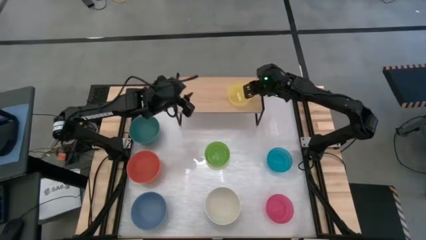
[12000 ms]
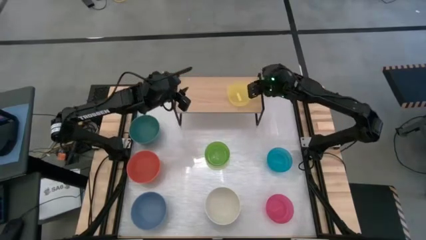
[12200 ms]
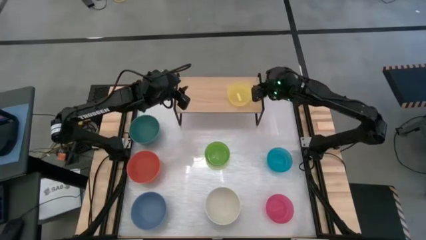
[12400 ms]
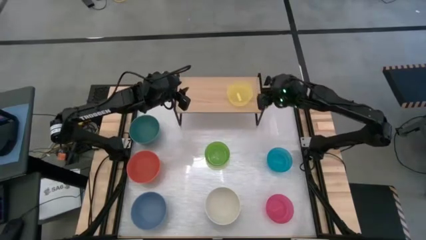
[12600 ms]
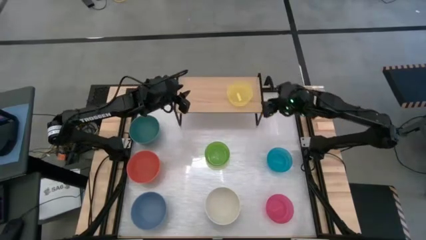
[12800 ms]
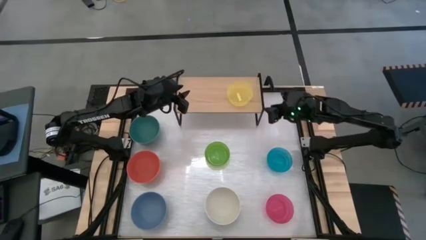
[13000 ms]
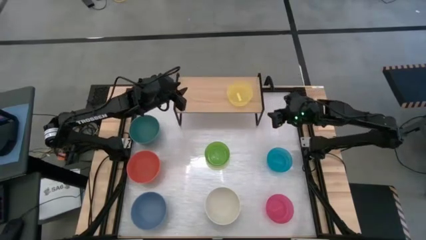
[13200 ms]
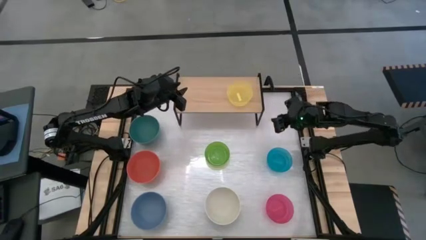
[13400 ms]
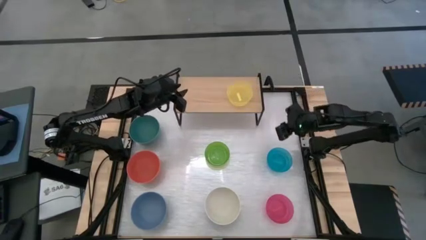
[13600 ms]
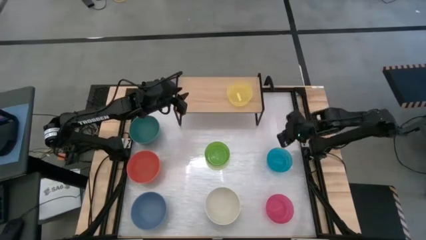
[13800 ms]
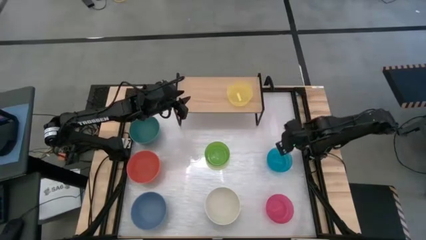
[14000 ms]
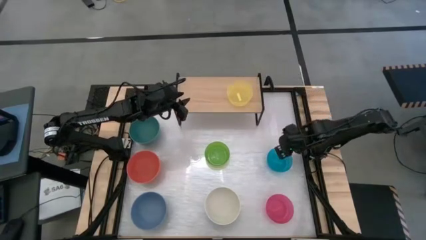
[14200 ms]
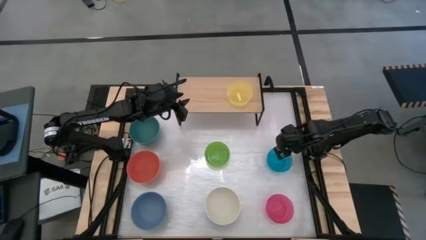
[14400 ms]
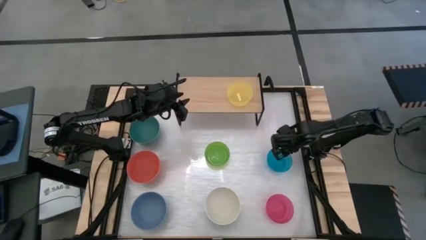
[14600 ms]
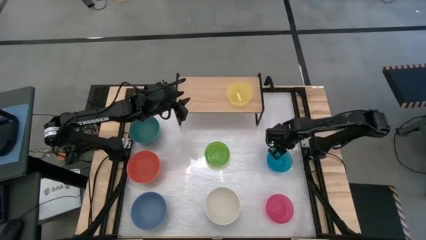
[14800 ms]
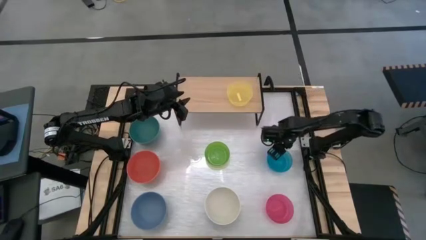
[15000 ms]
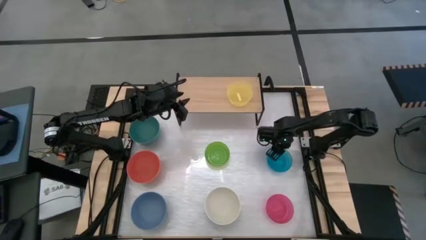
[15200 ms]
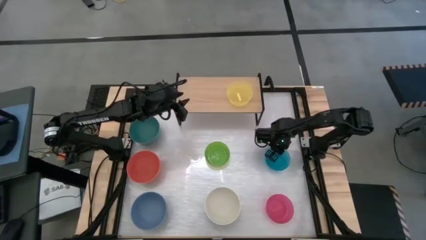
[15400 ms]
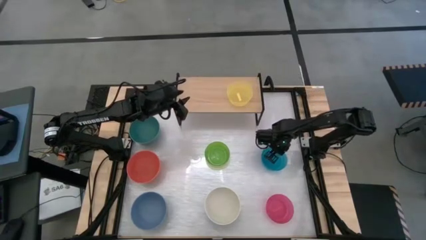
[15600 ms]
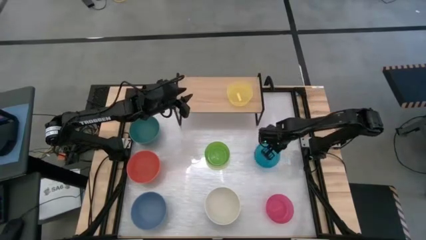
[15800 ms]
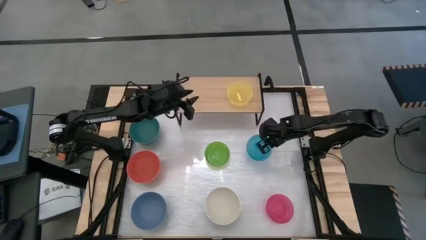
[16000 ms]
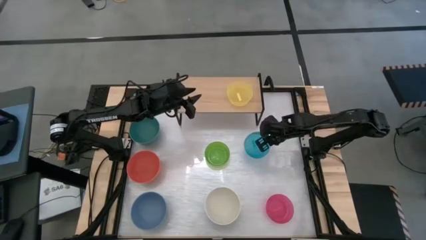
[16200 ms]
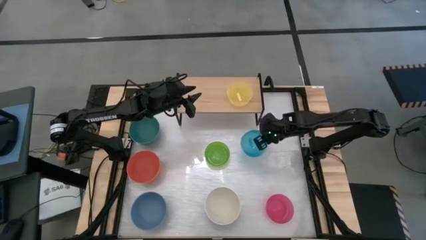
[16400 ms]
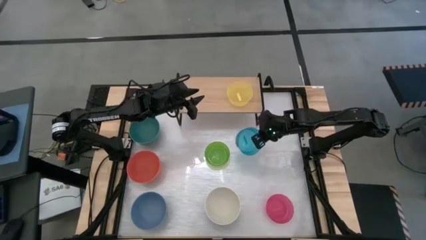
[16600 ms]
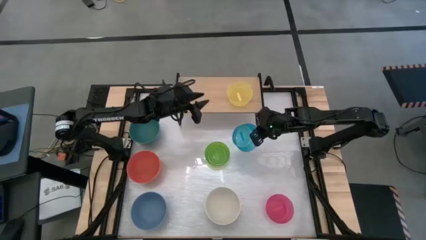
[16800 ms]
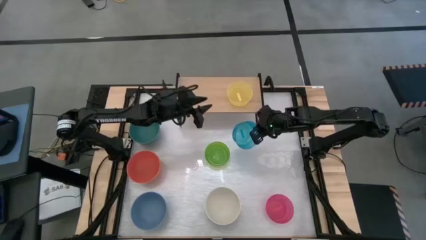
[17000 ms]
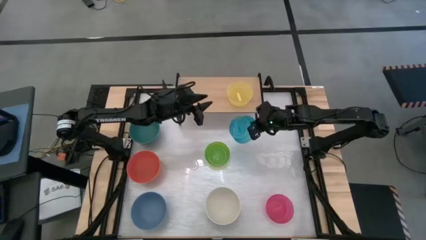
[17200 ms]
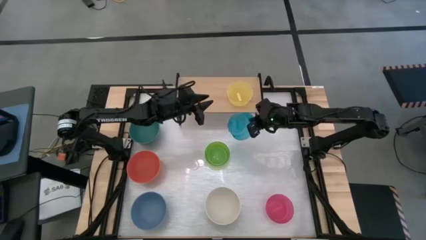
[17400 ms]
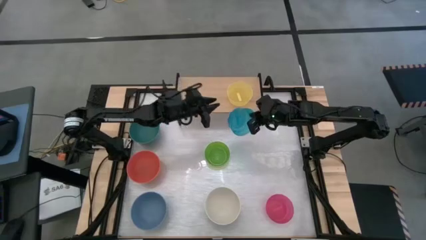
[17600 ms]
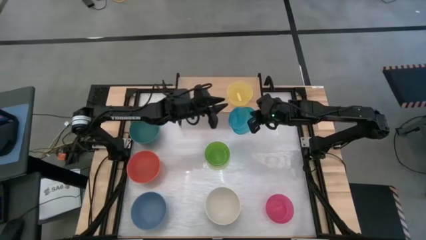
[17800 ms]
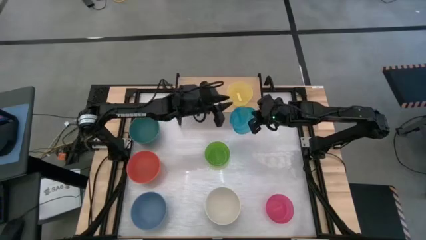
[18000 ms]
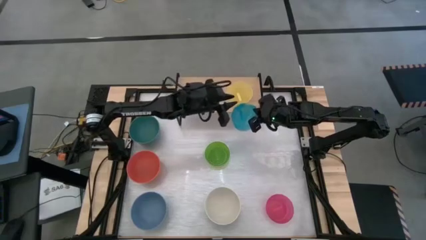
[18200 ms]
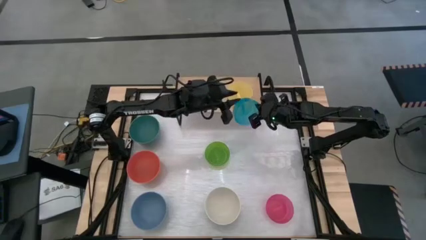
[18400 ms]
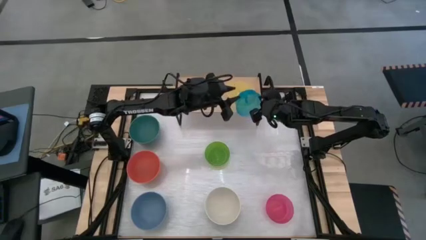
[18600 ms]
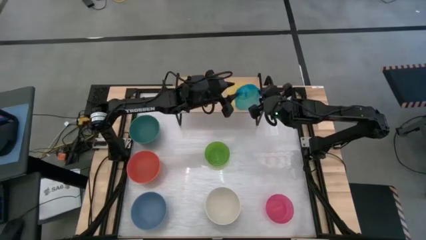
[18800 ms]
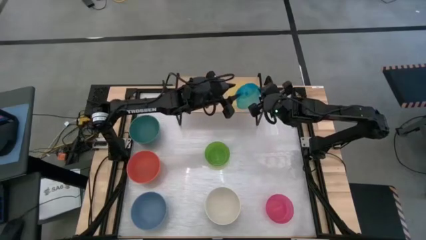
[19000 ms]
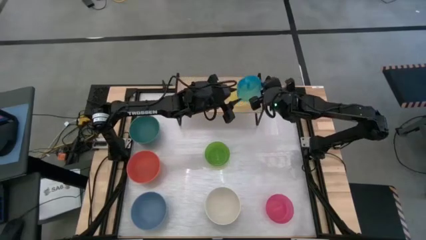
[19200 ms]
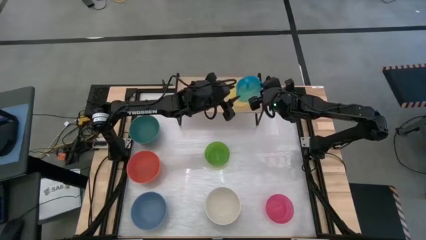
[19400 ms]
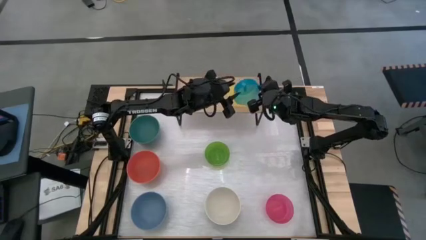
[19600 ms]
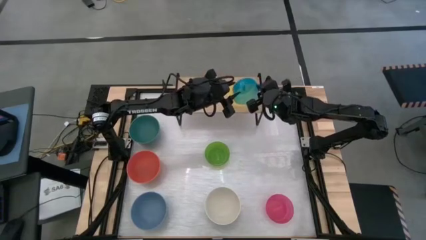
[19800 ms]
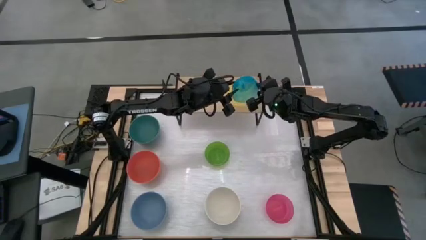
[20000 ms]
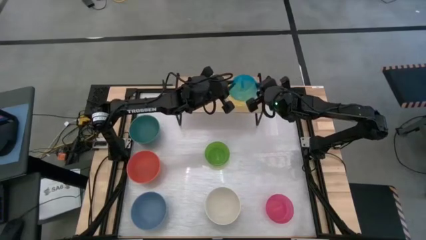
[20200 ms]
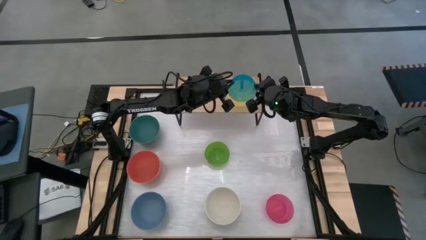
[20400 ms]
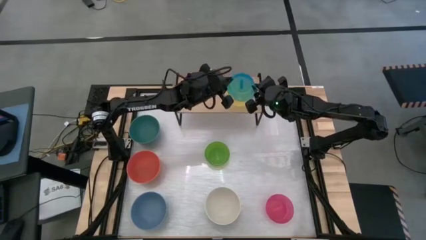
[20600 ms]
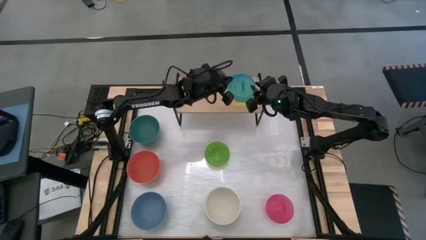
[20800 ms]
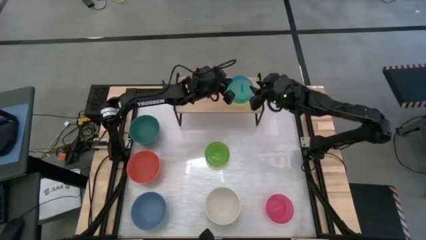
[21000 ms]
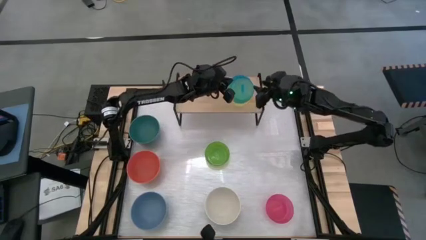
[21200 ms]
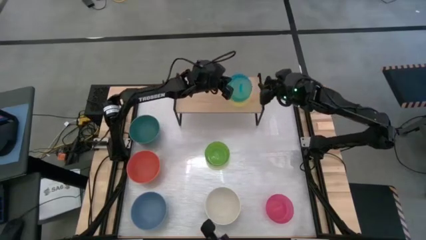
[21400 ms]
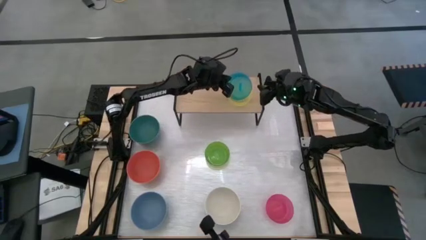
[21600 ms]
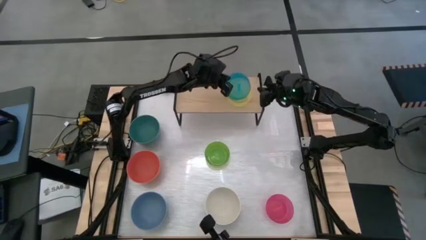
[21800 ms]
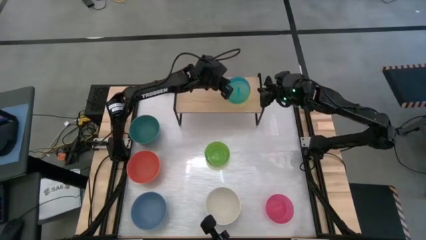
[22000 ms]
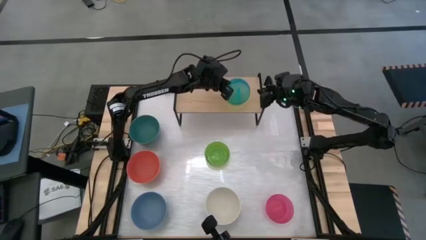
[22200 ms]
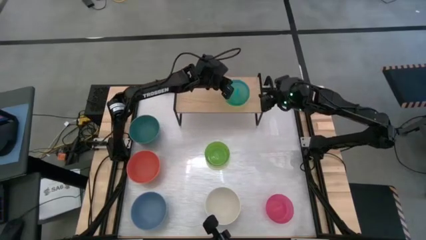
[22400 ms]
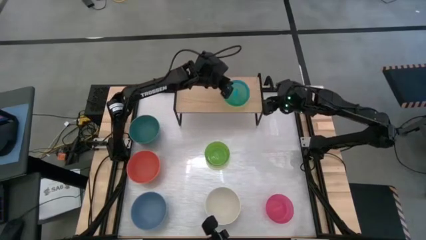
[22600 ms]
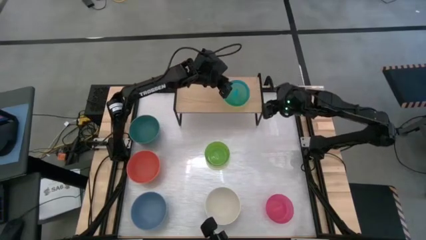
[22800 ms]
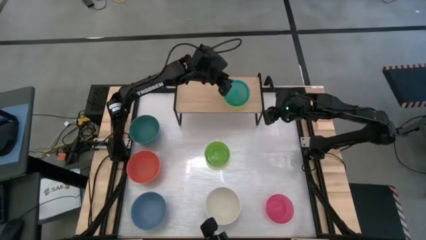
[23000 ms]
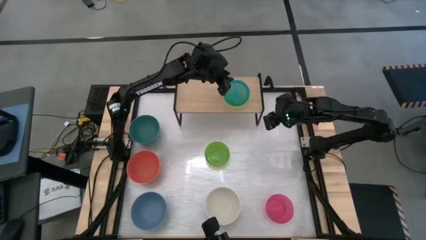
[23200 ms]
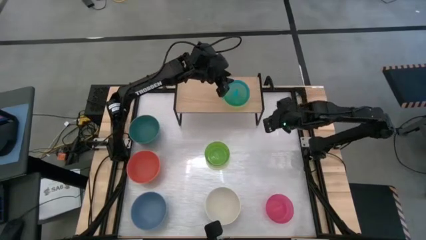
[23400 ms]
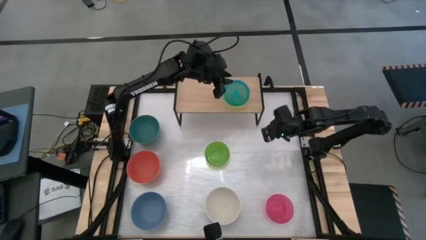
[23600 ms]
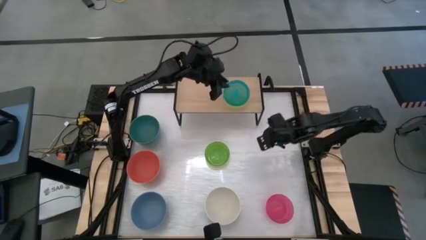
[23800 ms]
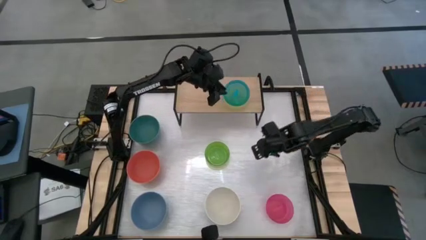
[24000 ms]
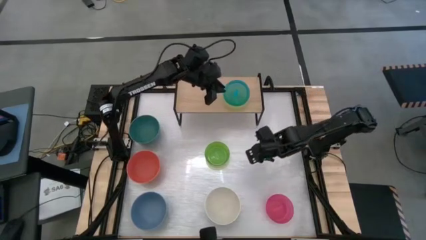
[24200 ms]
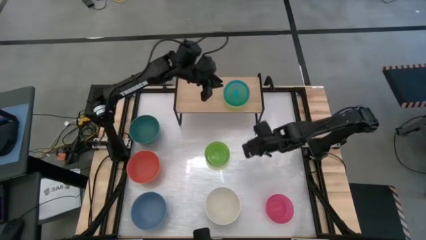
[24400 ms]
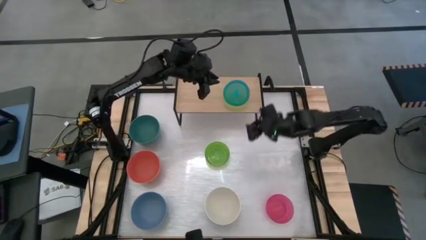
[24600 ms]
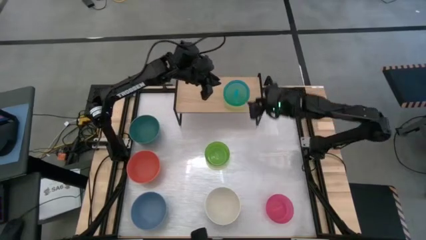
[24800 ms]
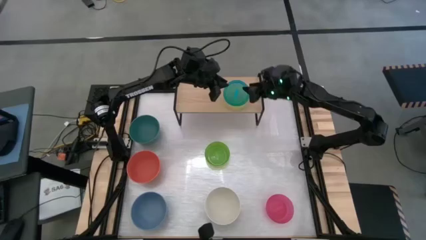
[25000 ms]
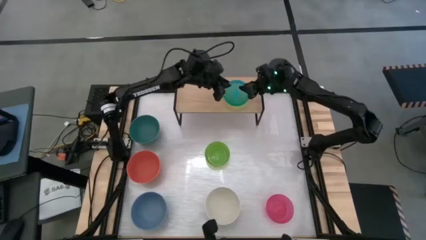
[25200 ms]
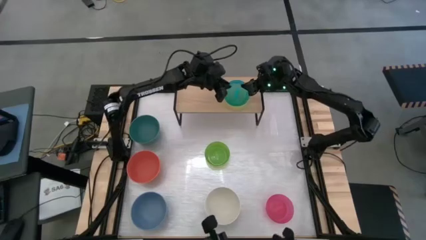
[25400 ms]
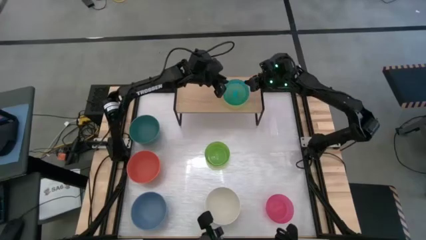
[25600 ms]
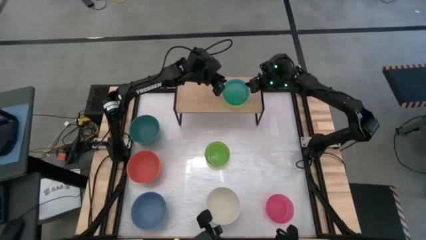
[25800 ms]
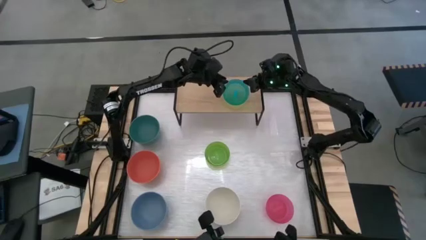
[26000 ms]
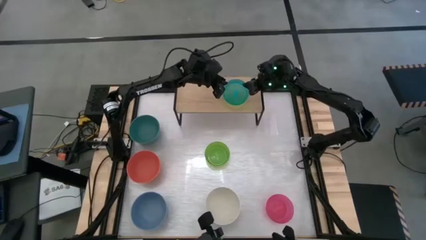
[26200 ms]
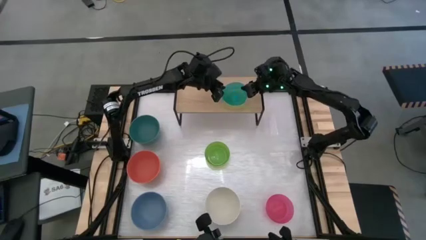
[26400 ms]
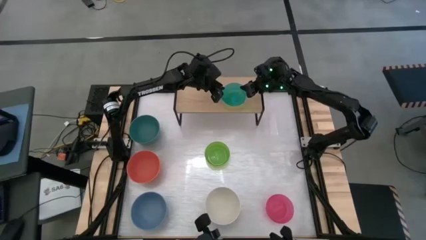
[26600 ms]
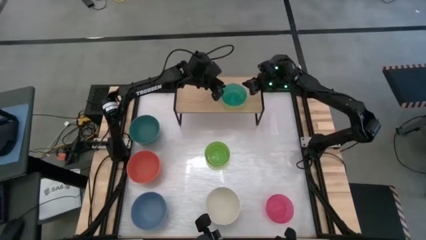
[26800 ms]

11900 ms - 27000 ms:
Task: Place and stack bowls onto a shelf
Stack the light blue bowl on top of the yellow bowl on the shelf
